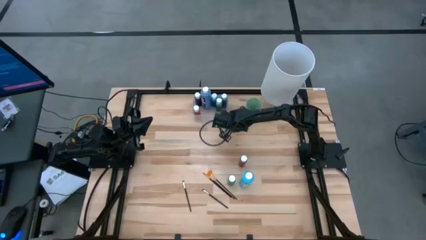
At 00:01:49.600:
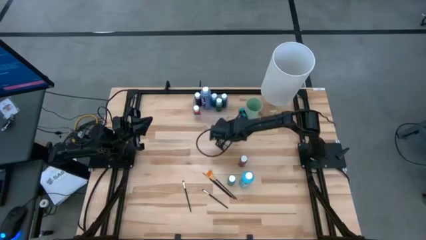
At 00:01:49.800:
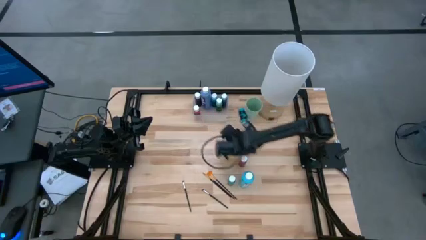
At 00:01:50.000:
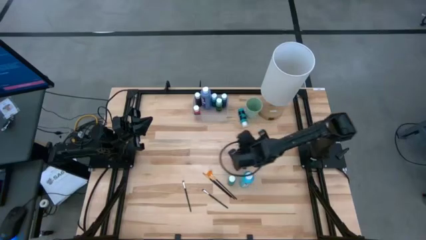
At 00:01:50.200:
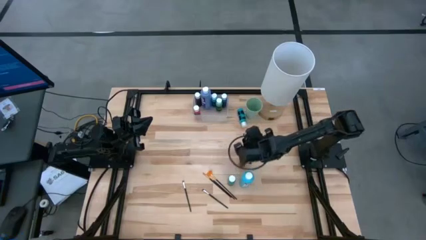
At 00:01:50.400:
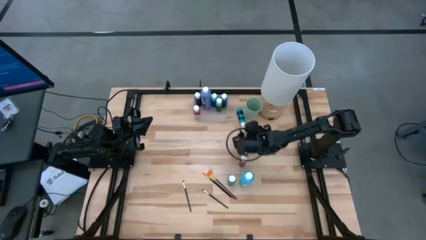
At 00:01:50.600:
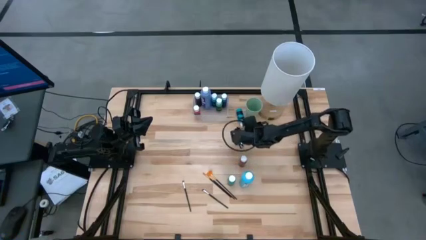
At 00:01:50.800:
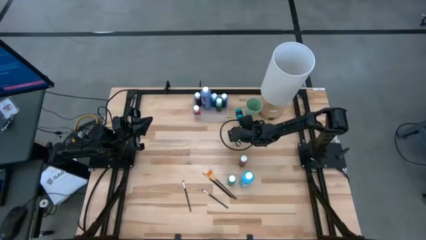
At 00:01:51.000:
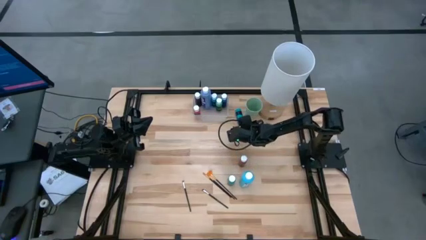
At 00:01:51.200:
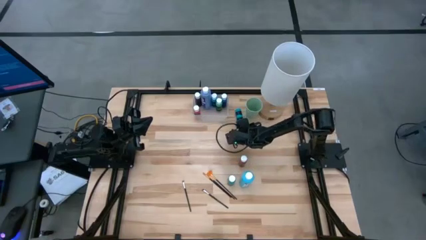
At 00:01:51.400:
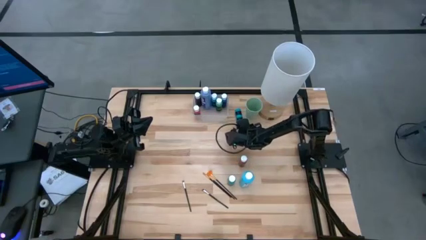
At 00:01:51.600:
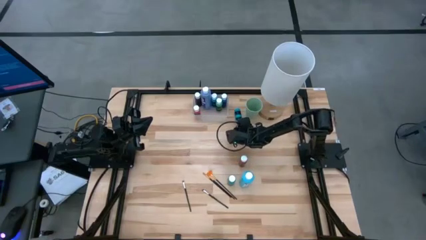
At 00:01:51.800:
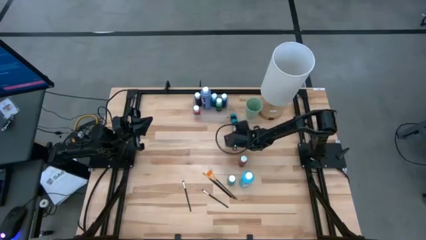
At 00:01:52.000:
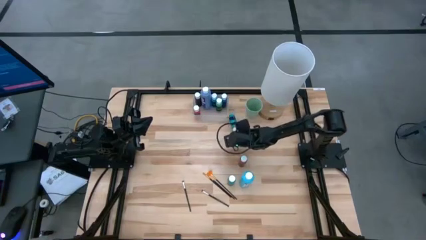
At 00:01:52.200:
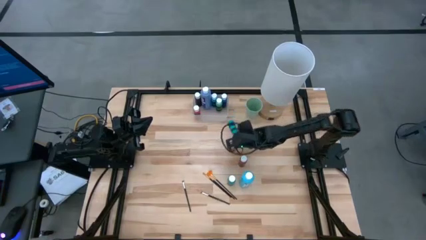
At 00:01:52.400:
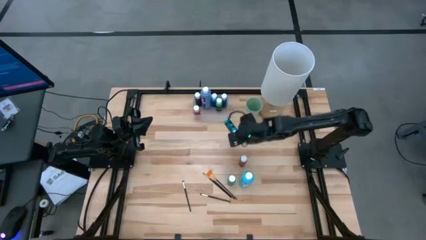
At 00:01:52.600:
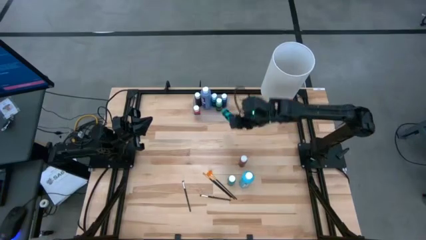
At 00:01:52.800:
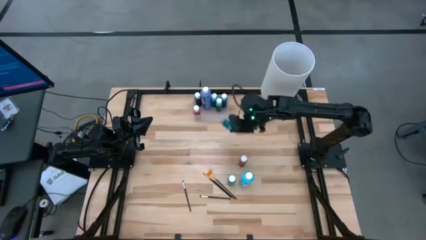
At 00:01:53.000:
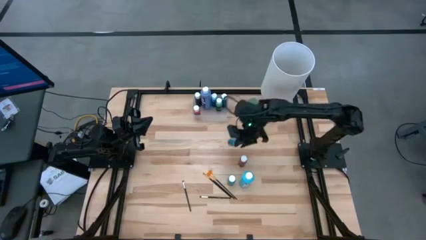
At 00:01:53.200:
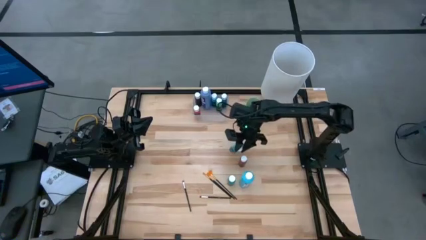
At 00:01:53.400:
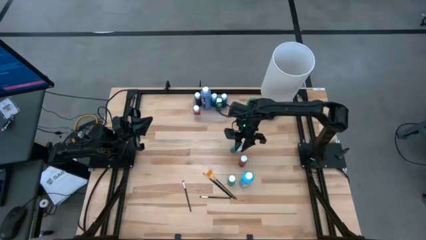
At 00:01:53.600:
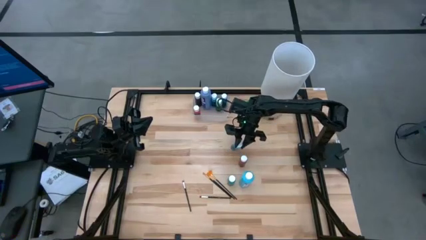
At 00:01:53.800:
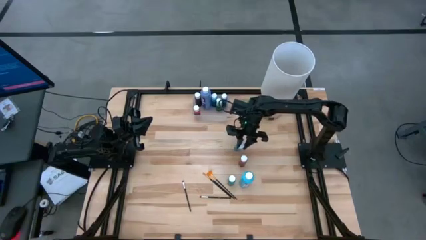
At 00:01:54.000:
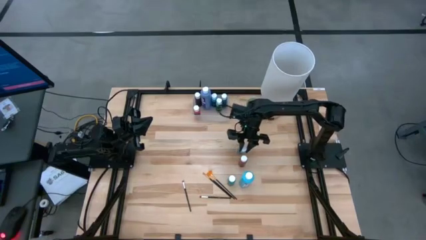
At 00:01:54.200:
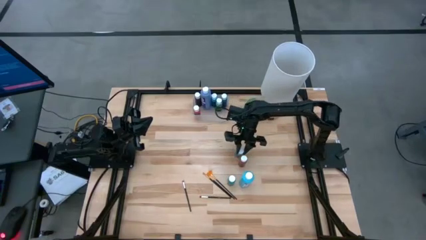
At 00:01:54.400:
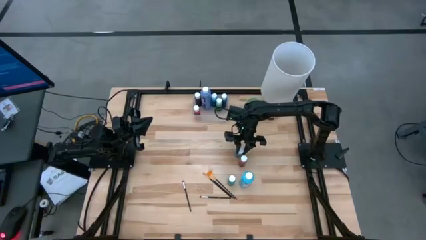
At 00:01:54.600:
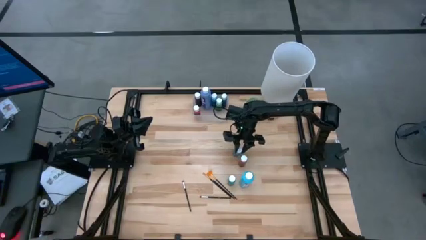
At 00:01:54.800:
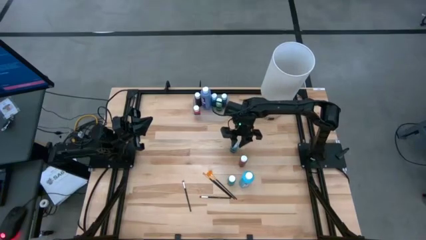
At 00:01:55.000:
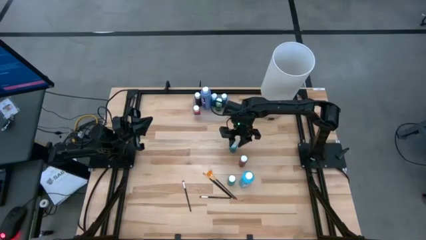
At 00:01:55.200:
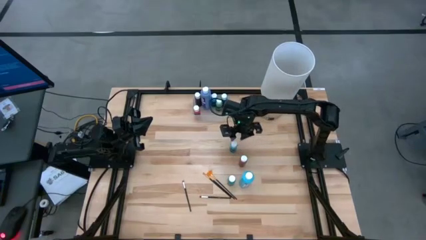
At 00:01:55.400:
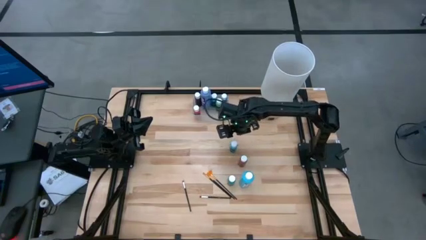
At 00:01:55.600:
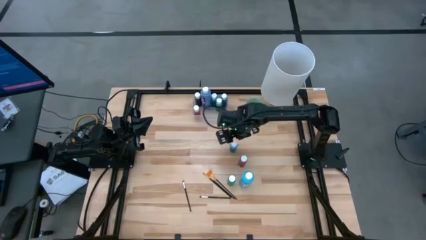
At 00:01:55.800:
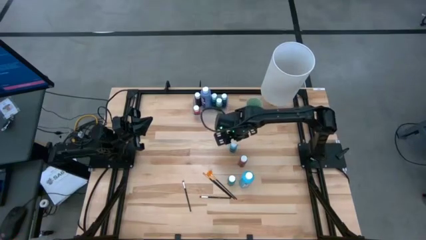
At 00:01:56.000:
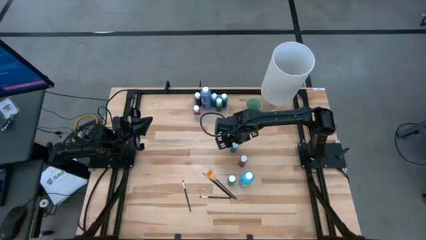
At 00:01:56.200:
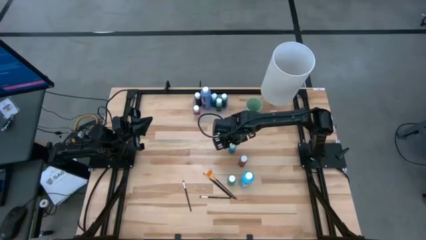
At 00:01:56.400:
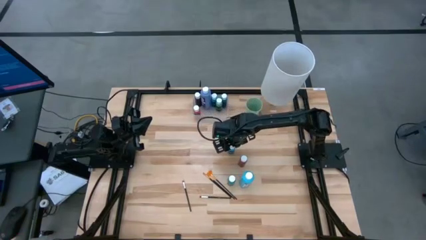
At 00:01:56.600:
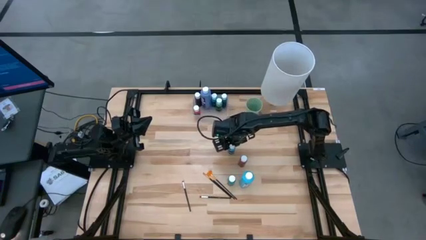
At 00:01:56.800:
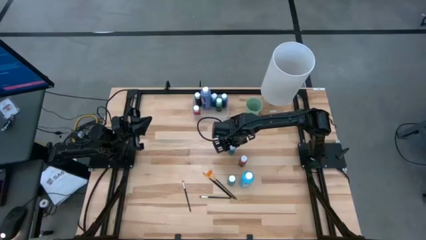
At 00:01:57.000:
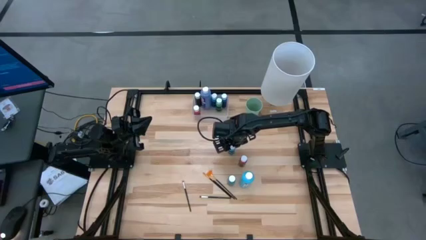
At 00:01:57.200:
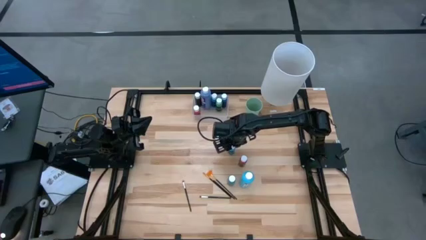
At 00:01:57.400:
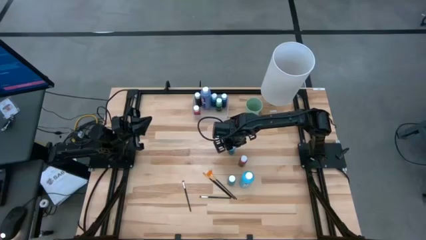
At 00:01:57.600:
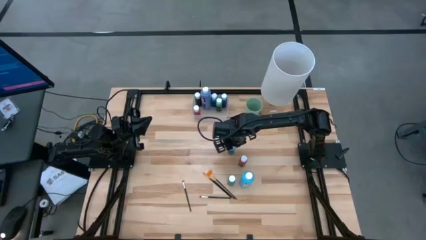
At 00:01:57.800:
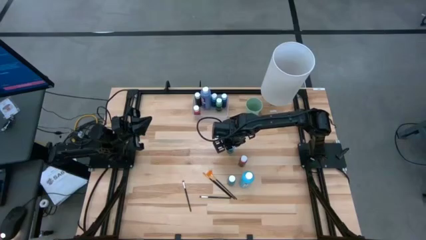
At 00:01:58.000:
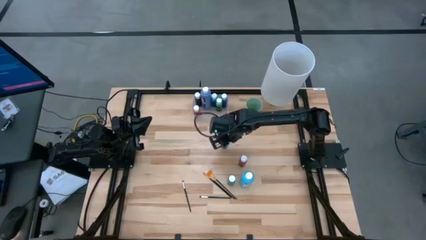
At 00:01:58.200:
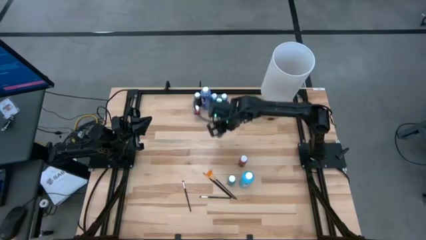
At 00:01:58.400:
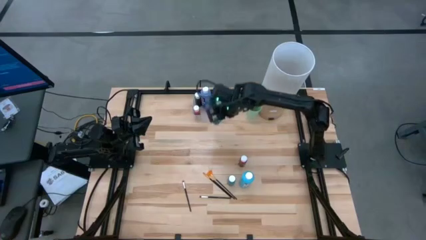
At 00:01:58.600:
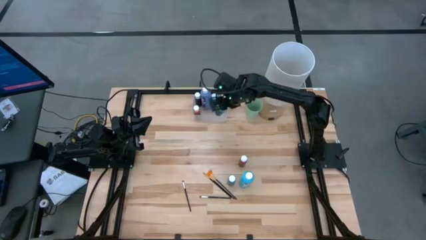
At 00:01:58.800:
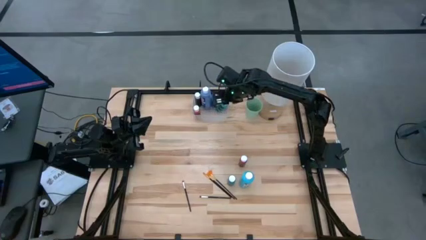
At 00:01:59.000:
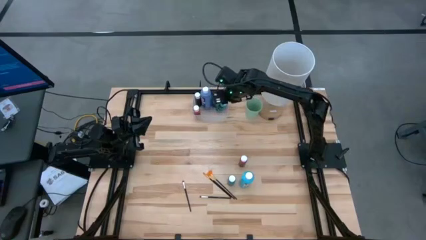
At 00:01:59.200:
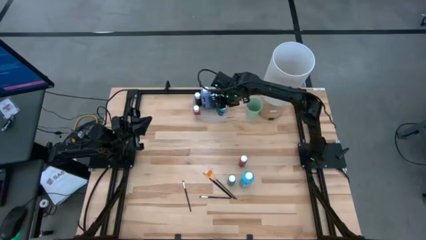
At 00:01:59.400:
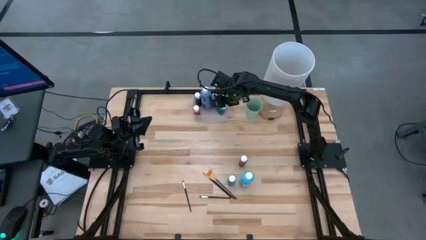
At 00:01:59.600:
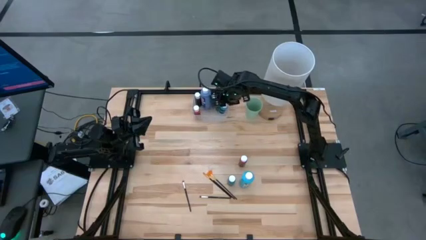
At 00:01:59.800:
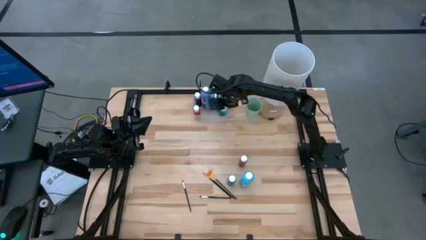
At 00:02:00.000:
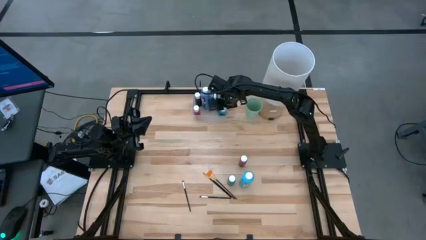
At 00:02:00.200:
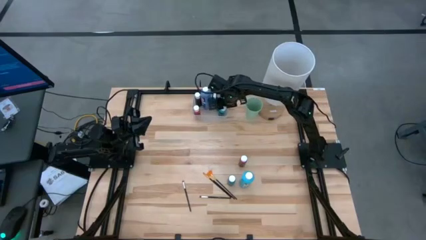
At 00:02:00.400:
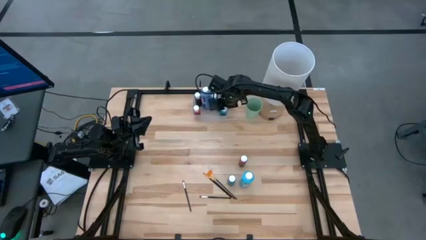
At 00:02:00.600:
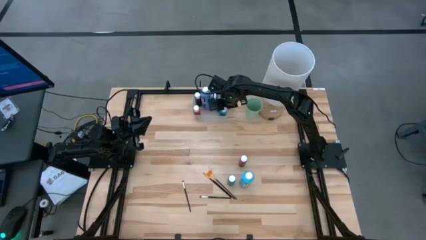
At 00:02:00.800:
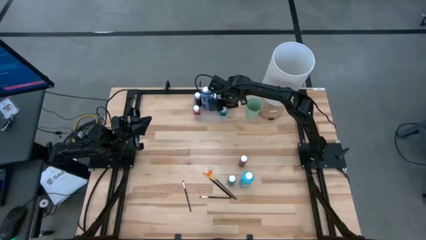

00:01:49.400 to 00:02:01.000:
Task: Pick & Place Paint Supplies
Put the top light blue paint bottle into the transparent bin

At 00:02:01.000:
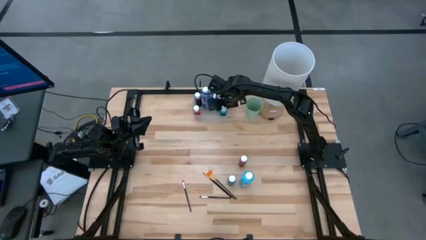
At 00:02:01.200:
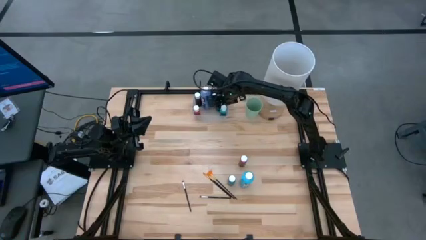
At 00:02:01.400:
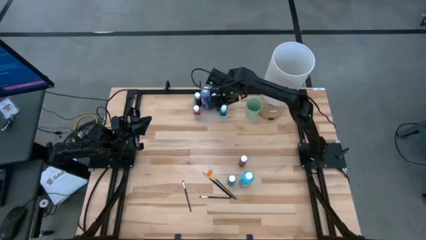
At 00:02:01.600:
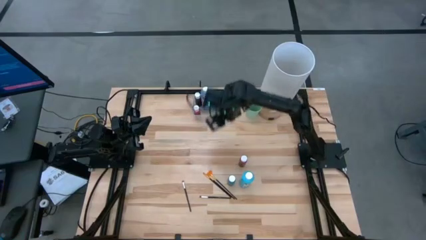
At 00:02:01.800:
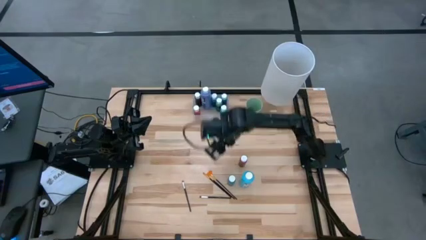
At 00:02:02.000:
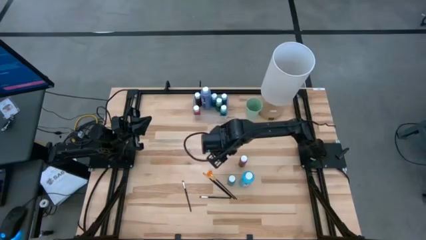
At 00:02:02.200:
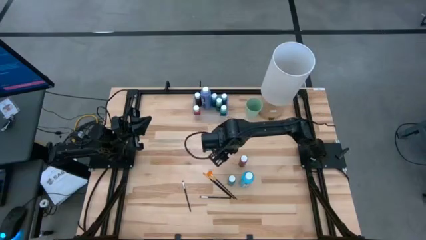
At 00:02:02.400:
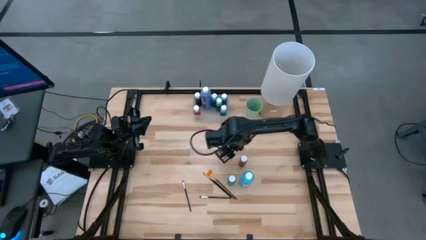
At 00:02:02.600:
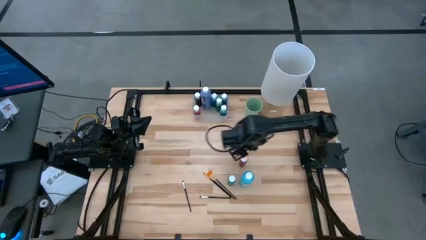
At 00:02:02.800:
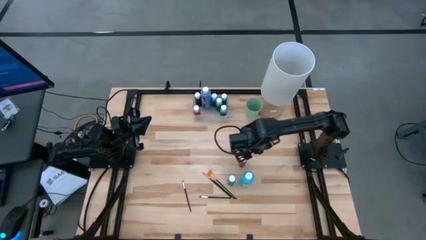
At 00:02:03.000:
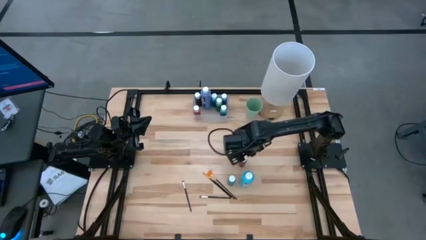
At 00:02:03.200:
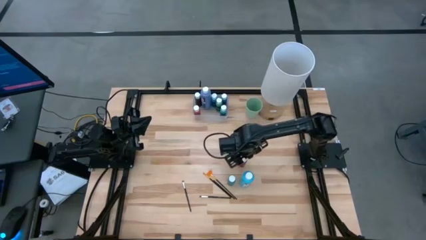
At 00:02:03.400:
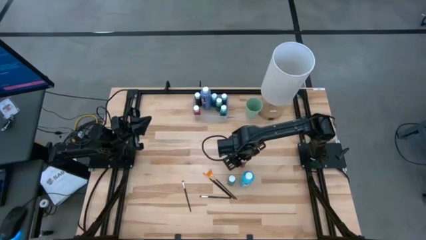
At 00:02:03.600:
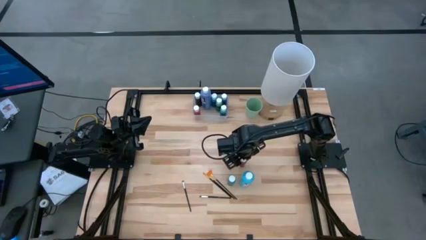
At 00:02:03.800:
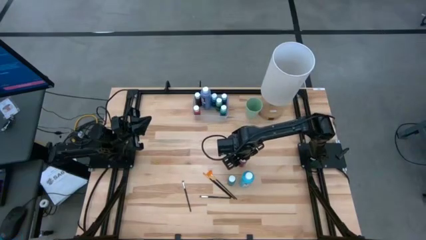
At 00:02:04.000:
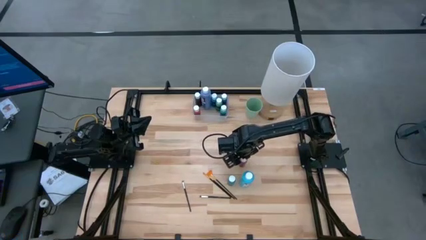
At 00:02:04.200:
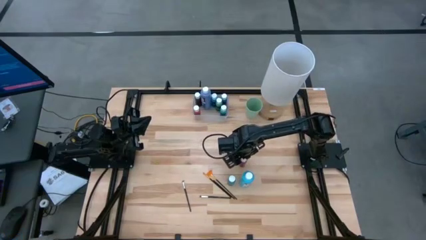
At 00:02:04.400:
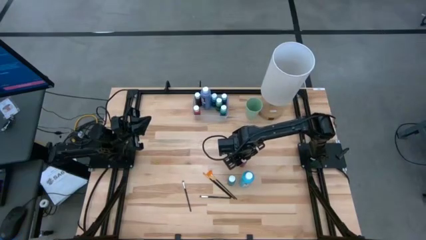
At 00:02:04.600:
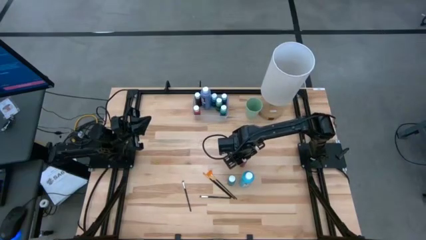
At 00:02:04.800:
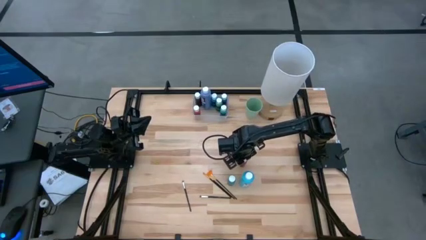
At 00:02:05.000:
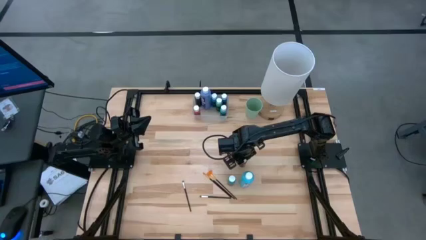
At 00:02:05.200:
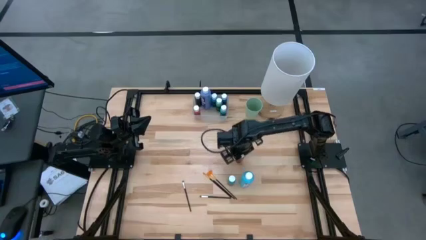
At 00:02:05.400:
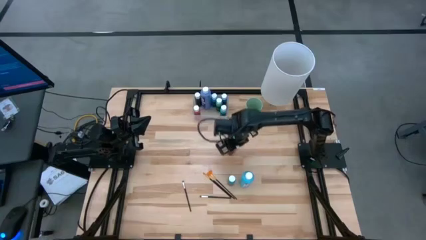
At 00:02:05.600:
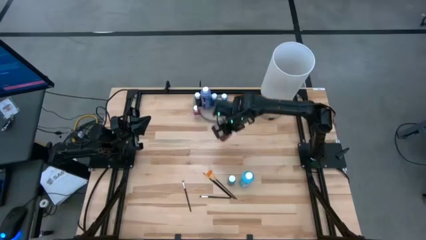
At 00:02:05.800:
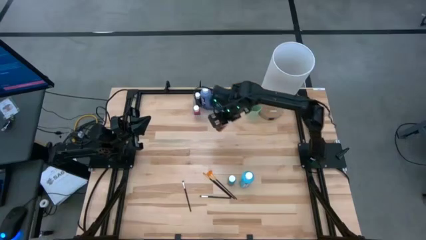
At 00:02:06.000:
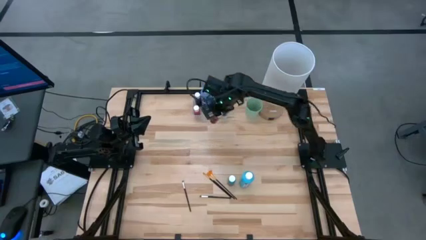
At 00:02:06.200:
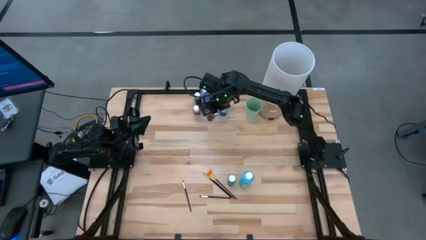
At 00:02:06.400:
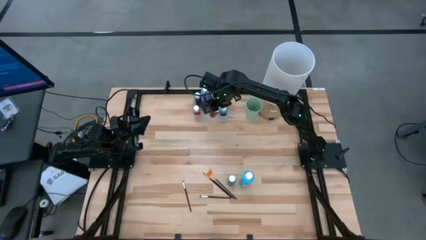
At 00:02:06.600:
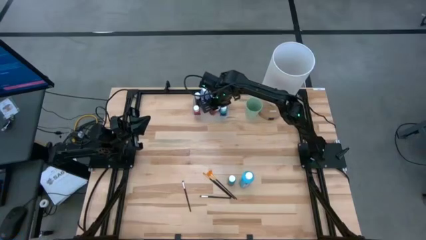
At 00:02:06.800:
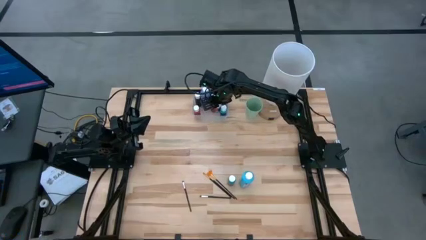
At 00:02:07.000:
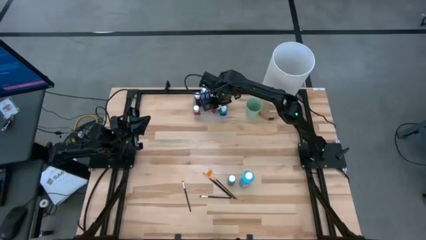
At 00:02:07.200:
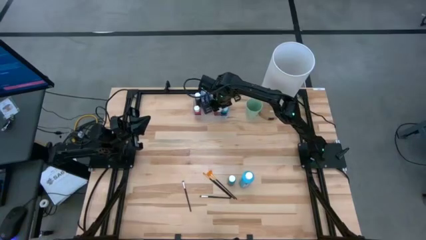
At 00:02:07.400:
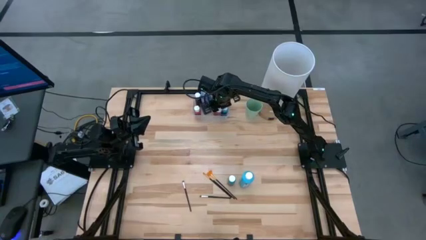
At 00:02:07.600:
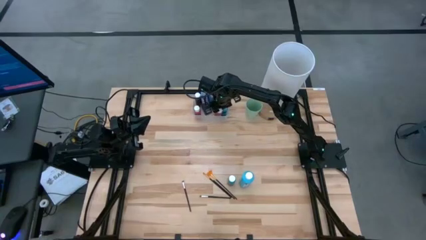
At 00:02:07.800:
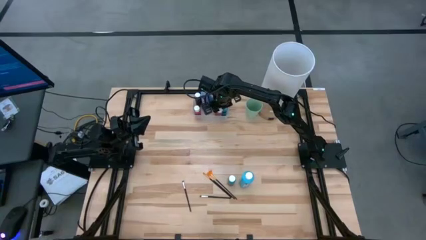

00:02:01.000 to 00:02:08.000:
Put the small red paint bottle into the transparent bin
